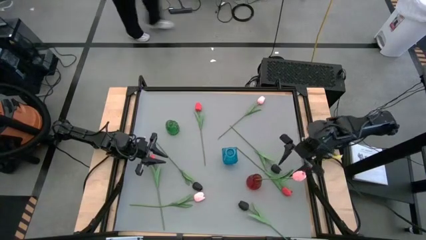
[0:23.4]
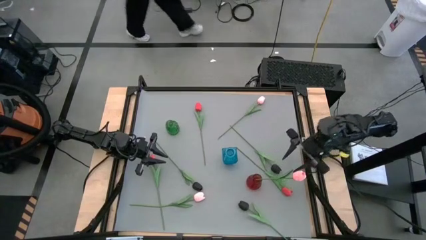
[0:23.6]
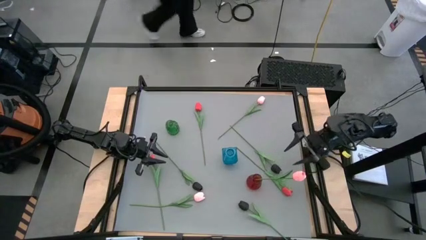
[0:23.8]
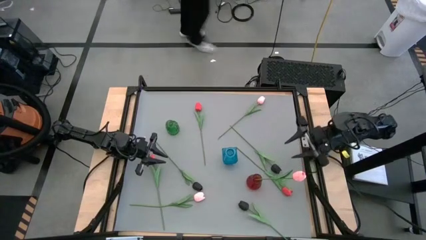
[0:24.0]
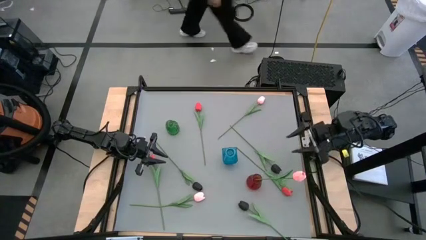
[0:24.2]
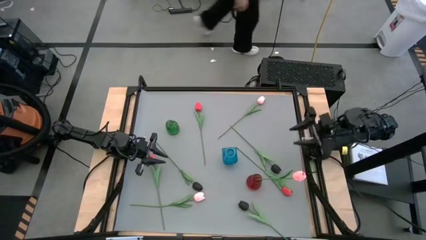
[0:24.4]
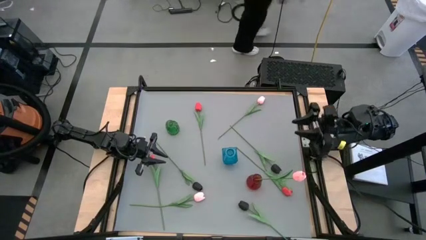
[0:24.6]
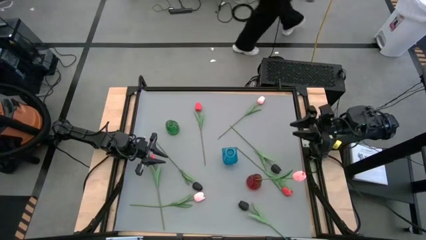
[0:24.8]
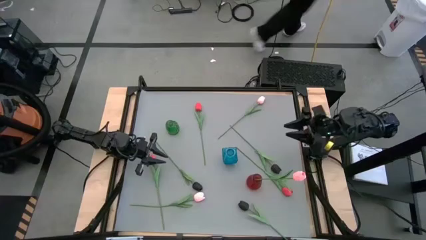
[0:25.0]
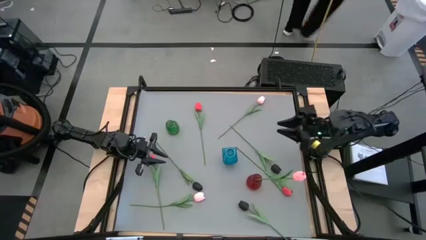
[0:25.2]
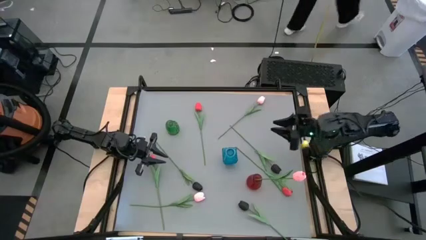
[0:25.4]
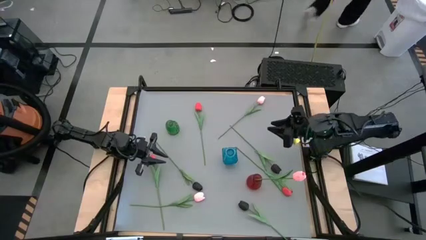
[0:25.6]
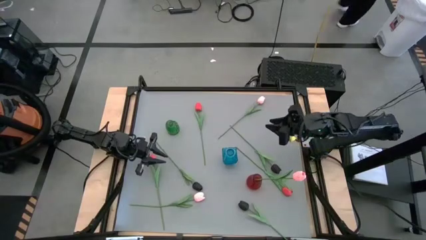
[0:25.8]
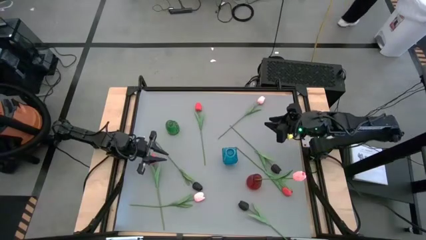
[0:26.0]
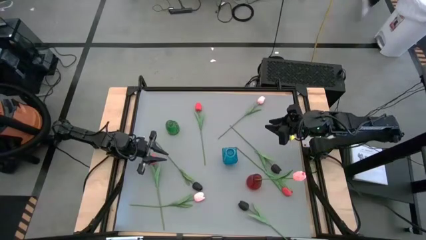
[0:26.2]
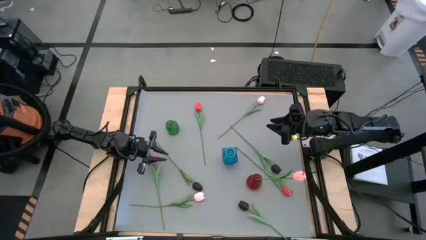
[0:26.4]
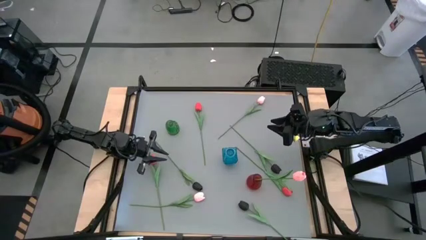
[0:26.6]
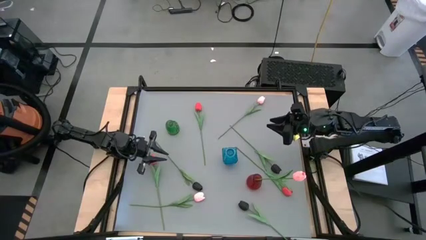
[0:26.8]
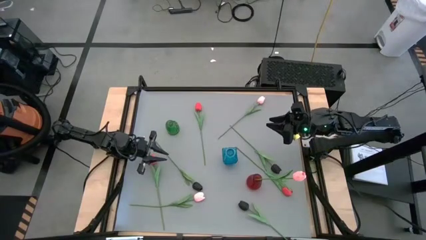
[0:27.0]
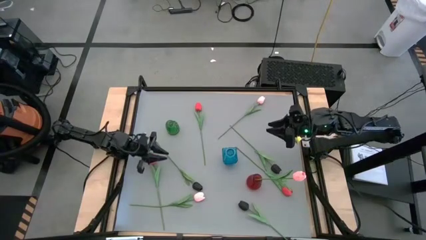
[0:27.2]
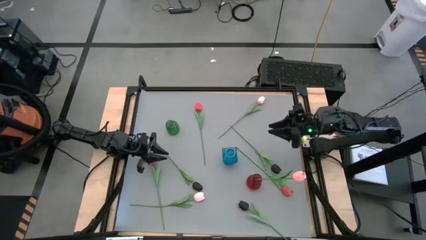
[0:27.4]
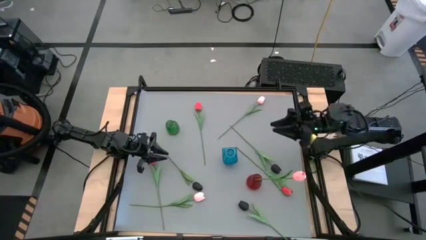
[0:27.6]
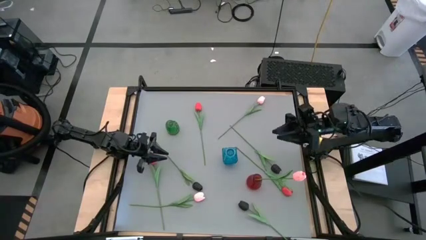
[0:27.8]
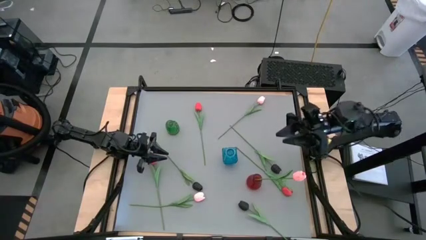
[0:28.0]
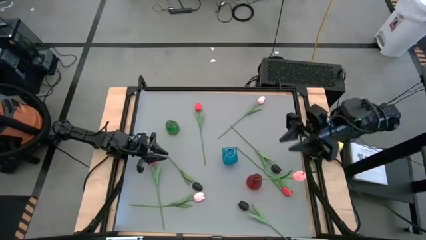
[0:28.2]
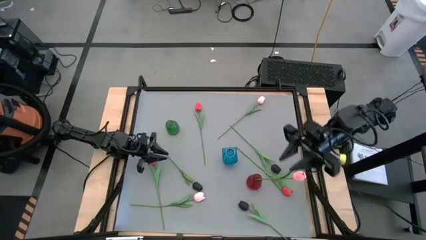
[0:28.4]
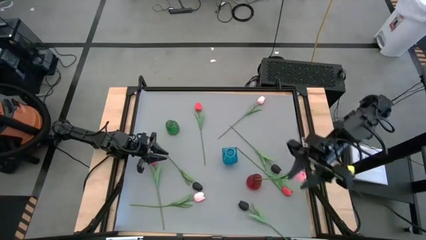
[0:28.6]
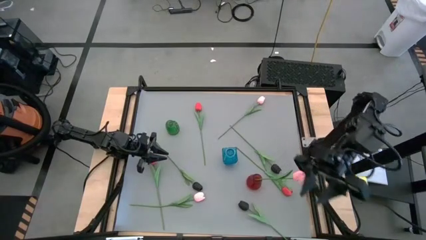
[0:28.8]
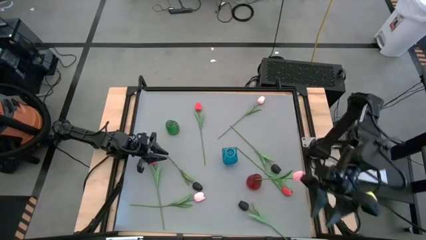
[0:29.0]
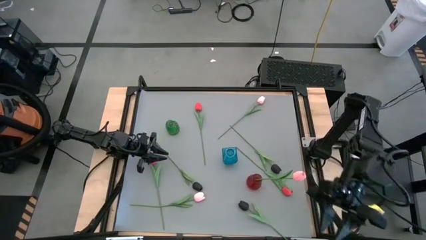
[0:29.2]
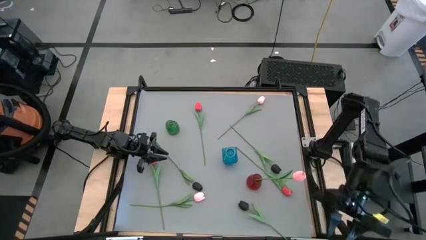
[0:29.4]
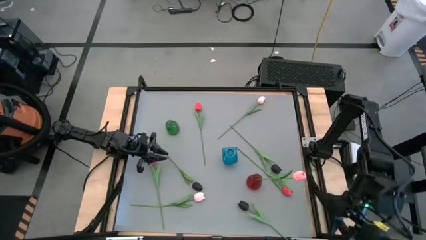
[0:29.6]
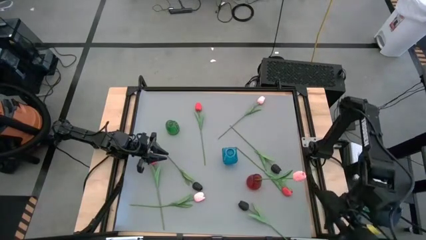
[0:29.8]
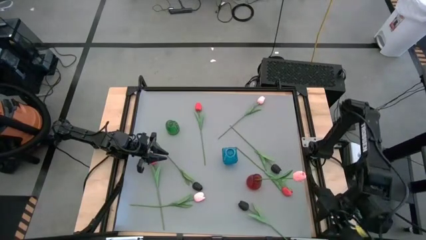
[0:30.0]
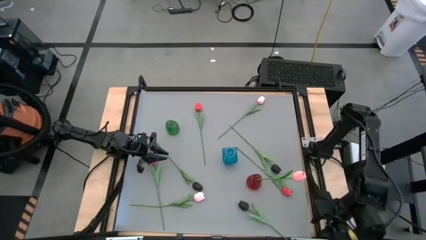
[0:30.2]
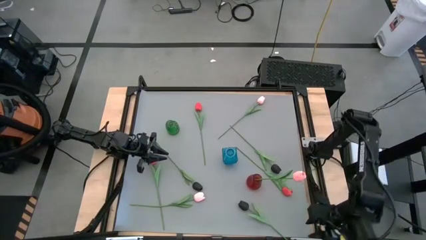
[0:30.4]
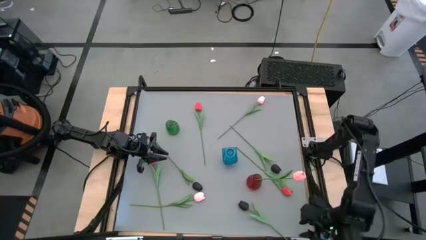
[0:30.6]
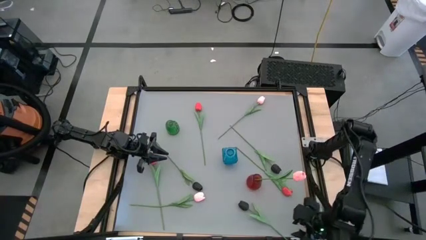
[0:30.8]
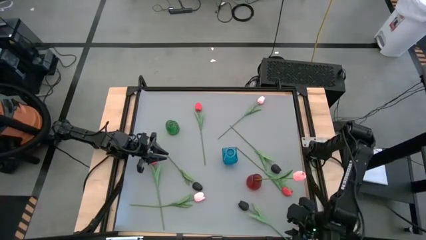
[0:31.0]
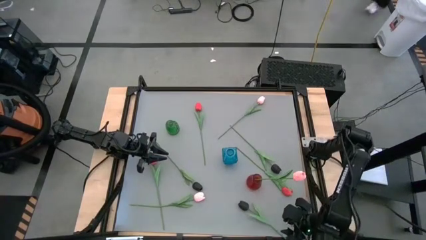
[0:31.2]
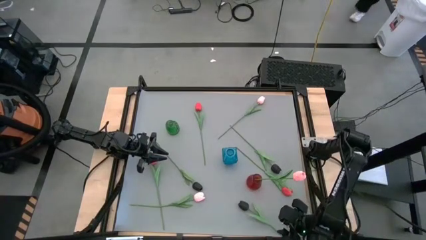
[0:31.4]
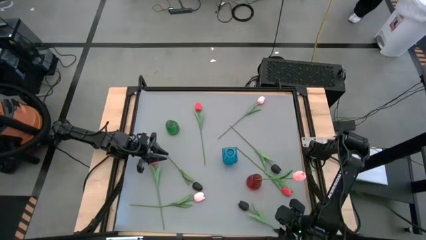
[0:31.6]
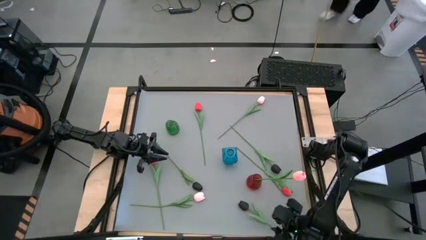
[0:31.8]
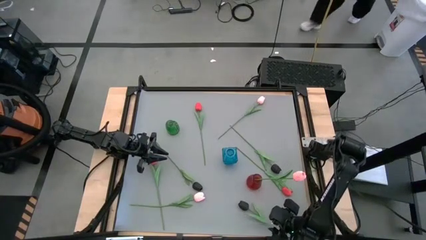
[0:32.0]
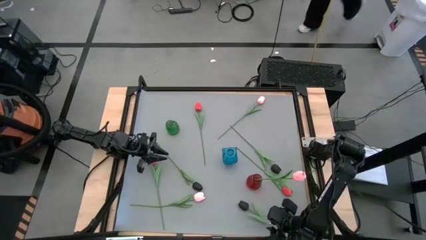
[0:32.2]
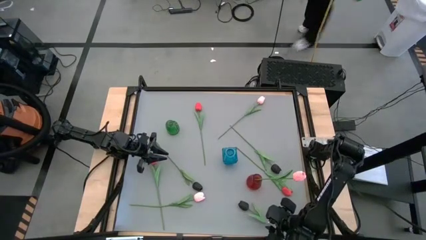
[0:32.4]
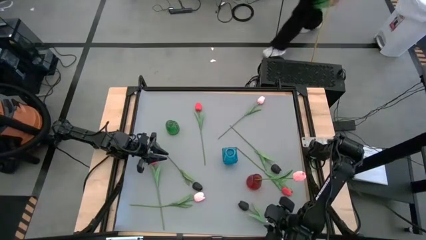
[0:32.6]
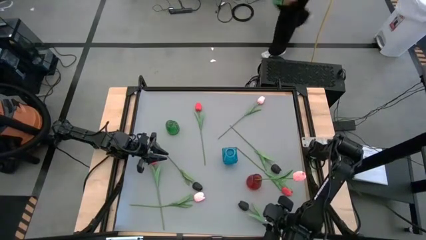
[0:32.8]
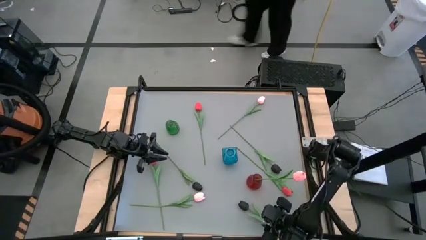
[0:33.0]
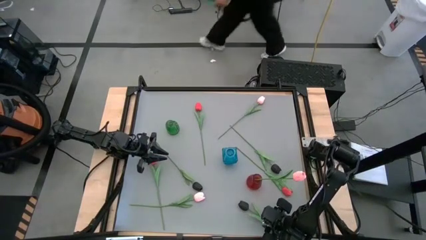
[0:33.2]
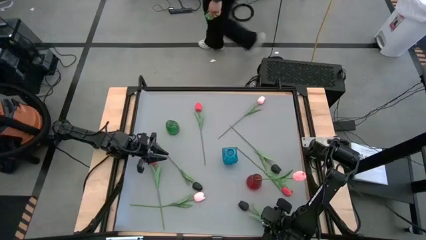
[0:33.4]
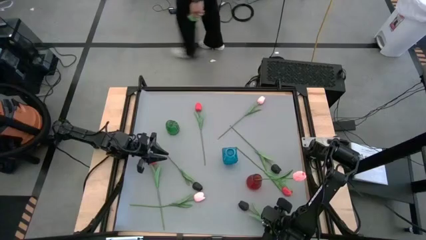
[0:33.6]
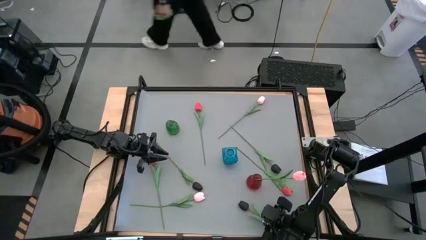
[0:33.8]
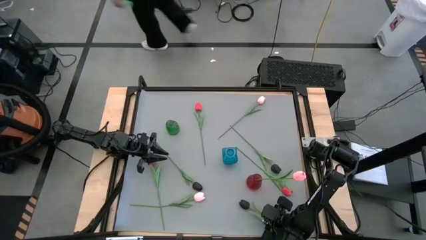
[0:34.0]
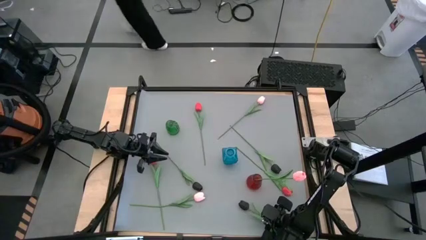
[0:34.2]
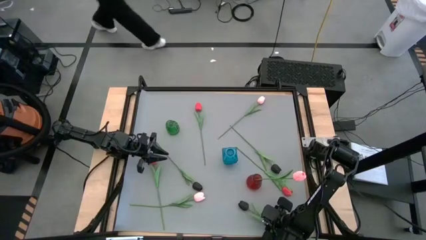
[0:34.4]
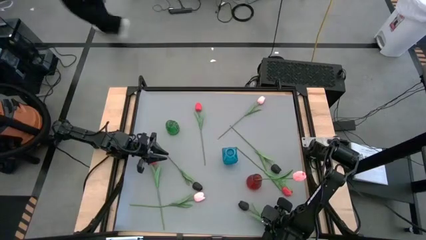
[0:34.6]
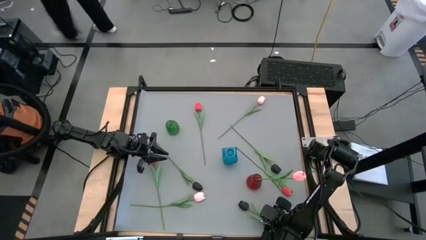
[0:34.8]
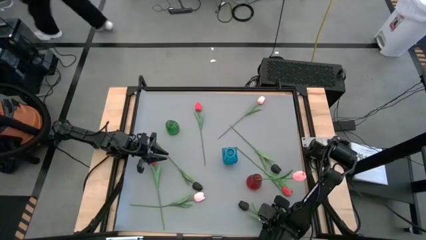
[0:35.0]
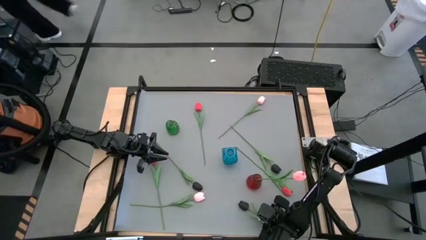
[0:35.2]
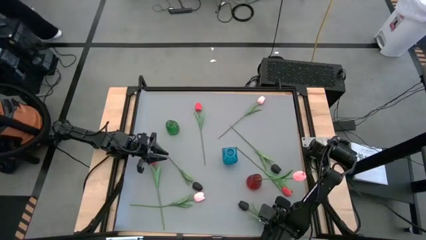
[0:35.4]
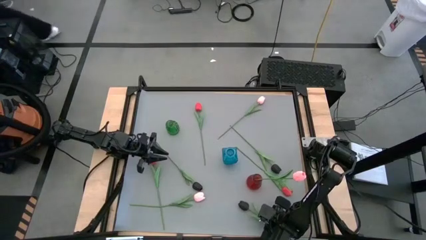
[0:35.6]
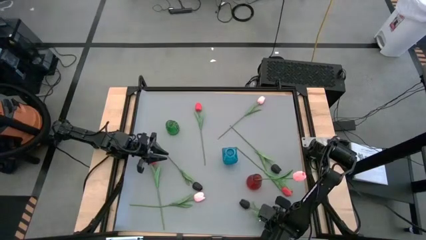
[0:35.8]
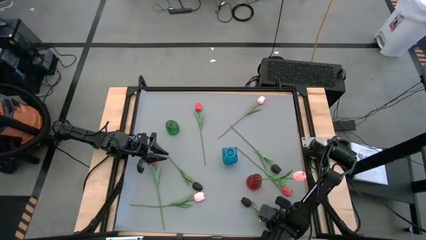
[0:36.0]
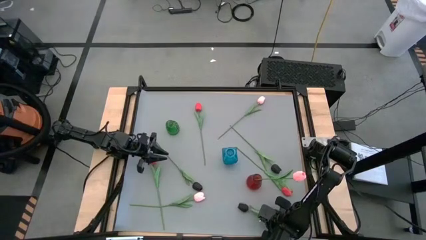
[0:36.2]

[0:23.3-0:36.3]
Task: Sort flowers into vase by color
Put the bottom black tulip into the green vase
